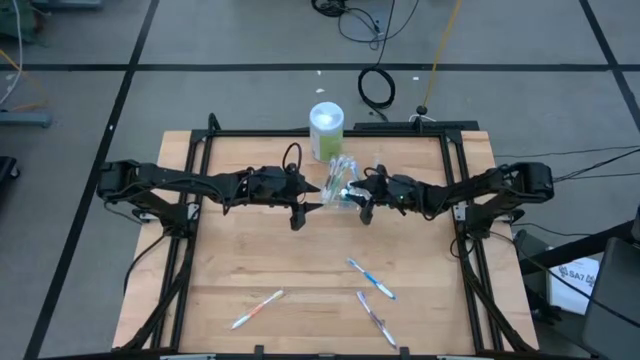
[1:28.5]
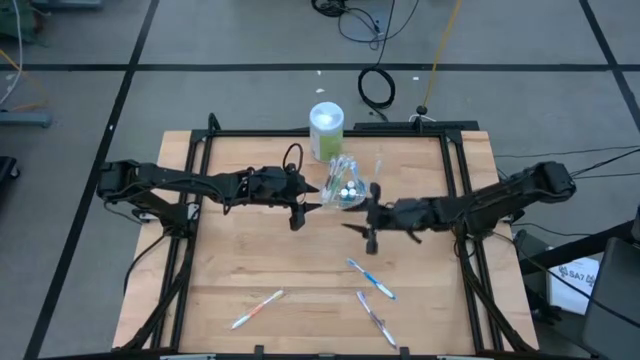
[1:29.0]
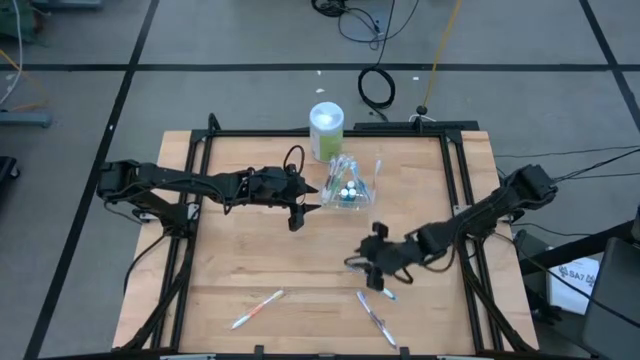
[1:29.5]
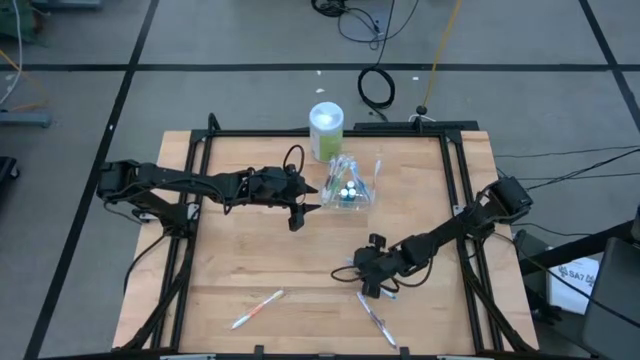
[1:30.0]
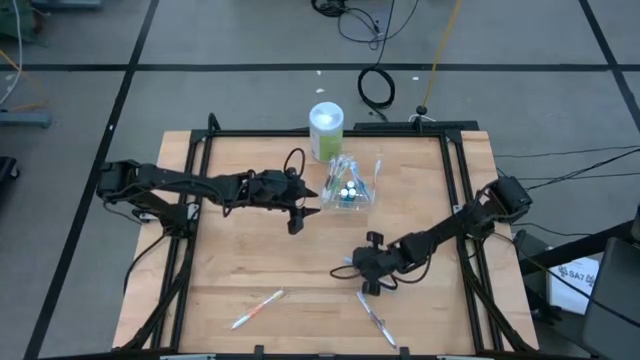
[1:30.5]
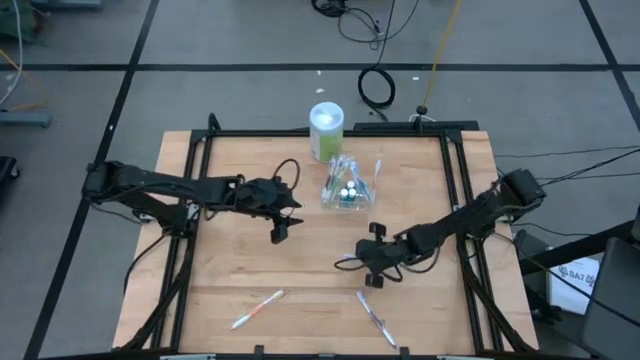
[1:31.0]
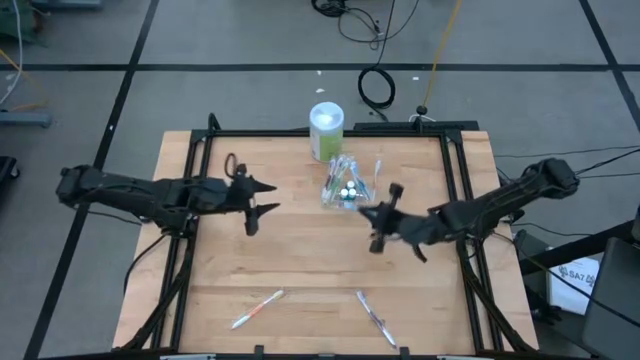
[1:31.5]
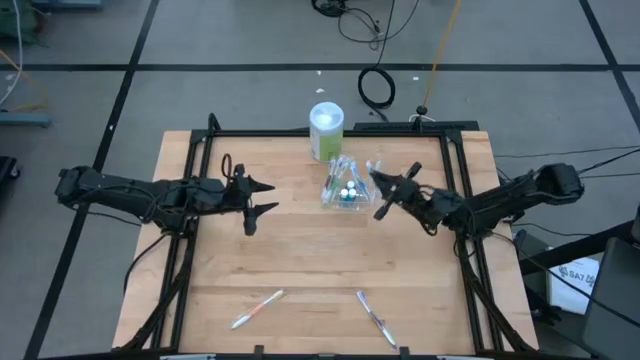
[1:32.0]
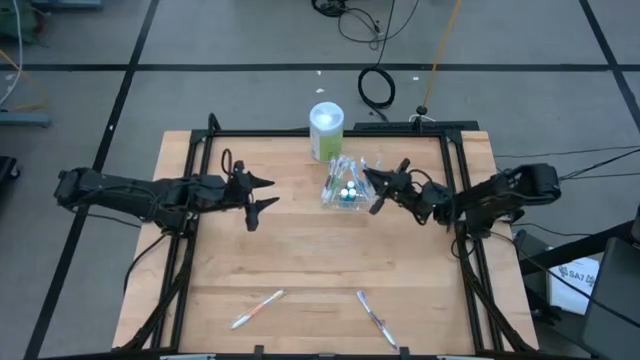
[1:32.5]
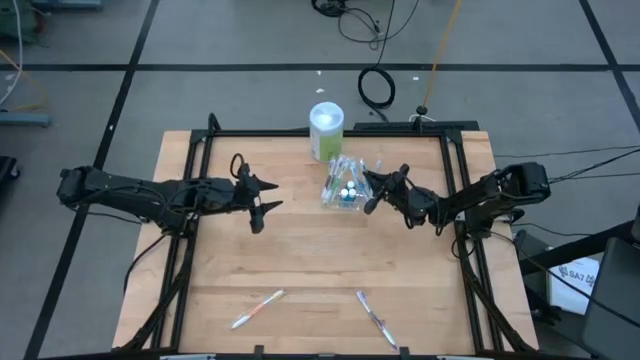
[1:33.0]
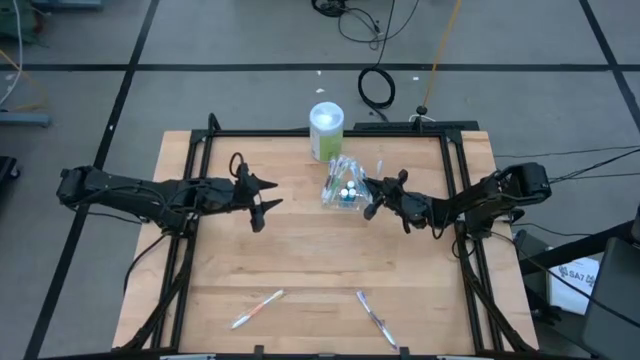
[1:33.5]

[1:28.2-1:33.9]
Task: Pick & Place toothbrushing station
Put the blue toothbrush into the transparent organizer

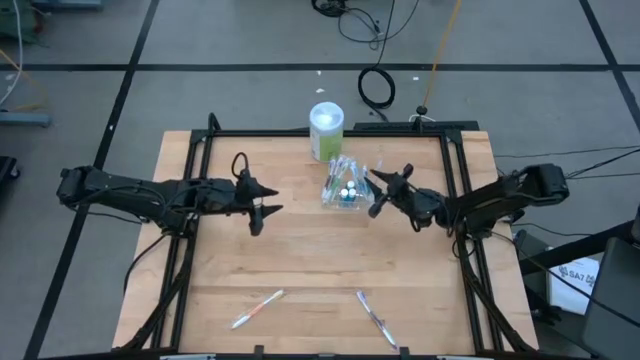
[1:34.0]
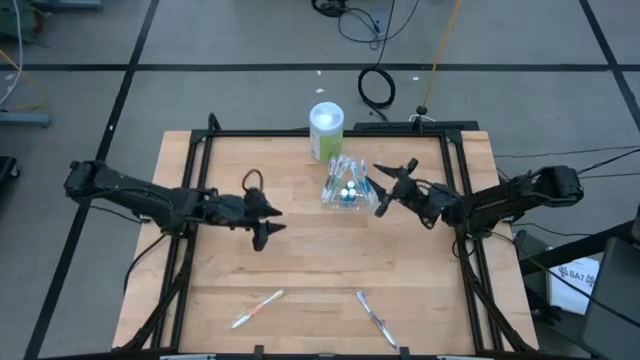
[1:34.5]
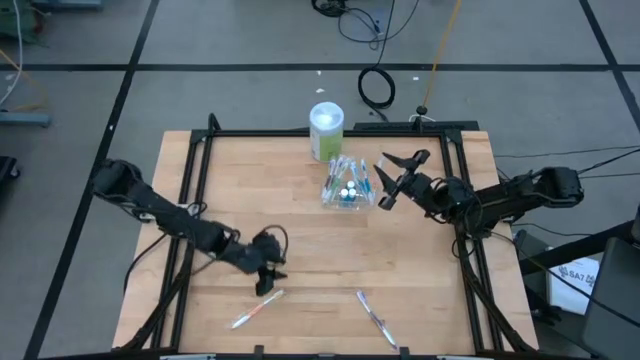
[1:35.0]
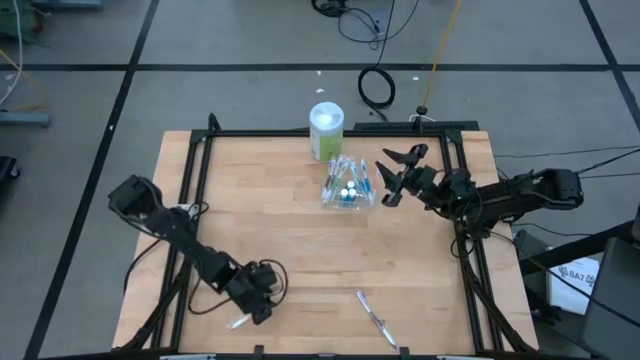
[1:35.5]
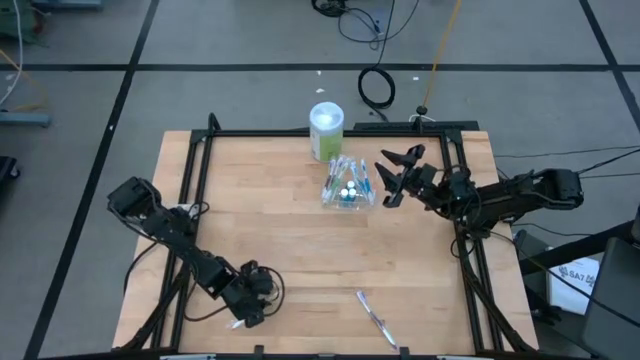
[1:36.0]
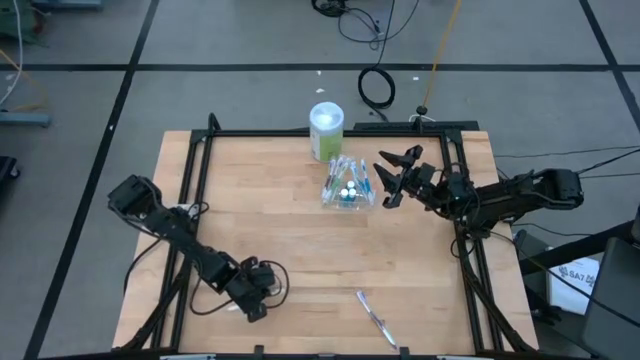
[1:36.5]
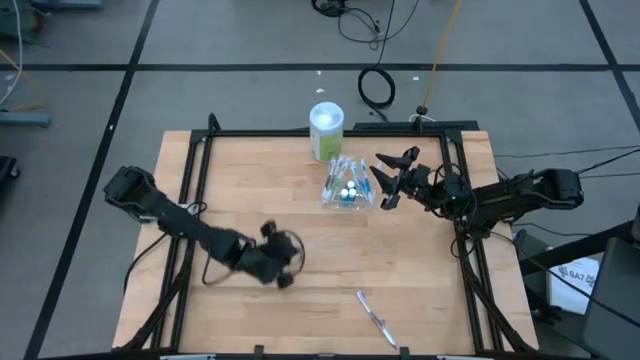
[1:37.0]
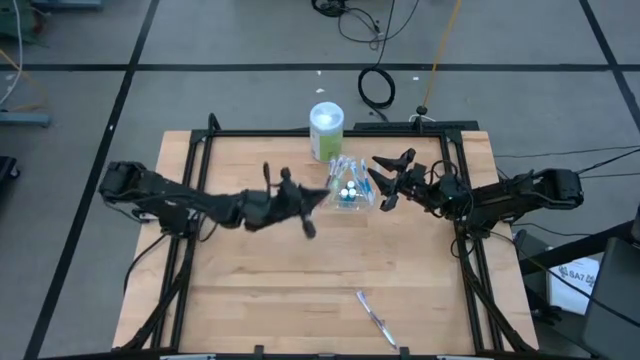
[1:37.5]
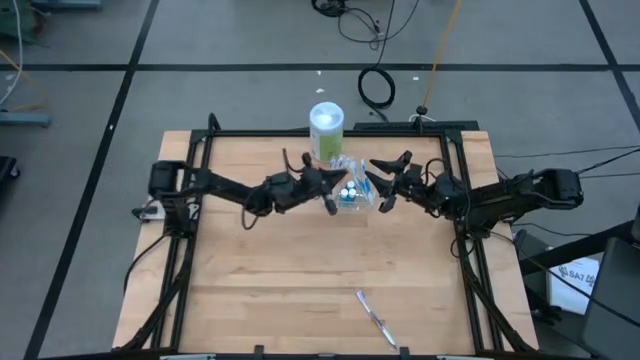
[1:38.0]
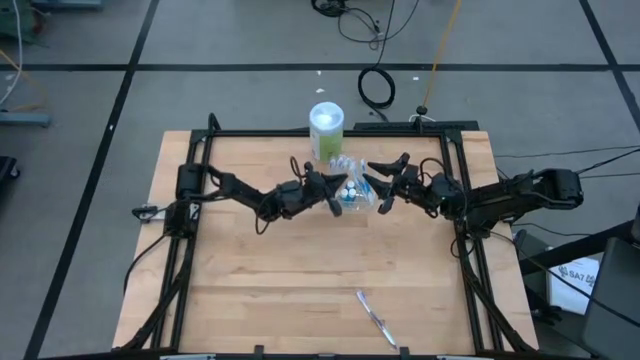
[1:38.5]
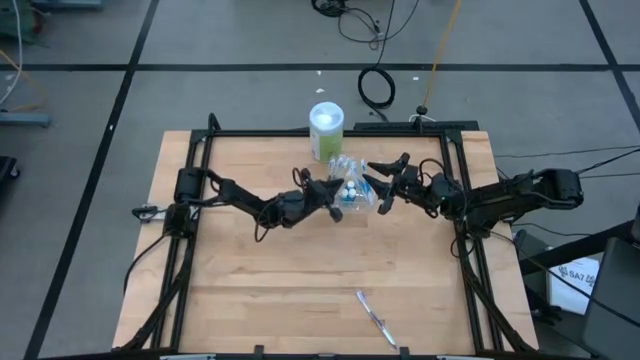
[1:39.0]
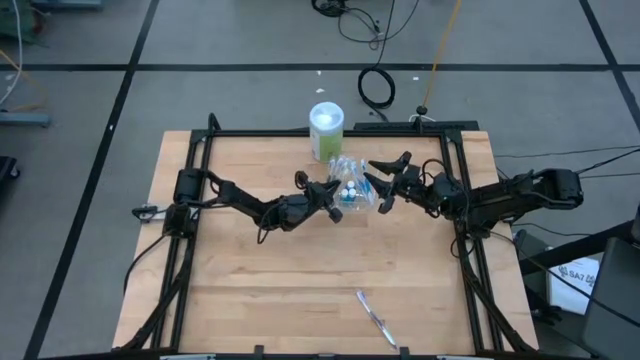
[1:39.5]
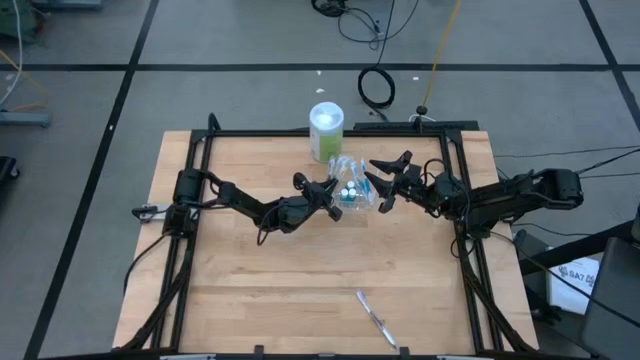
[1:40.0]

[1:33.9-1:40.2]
Put the orange toothbrush into the transparent organizer

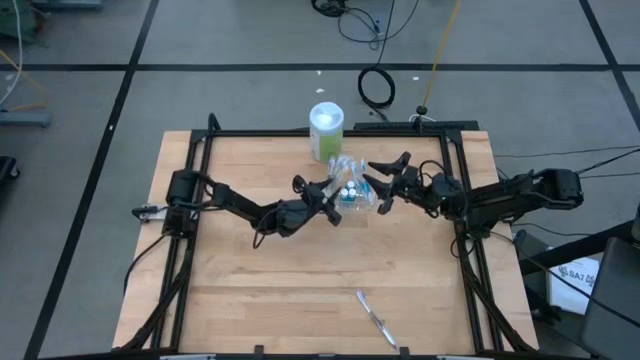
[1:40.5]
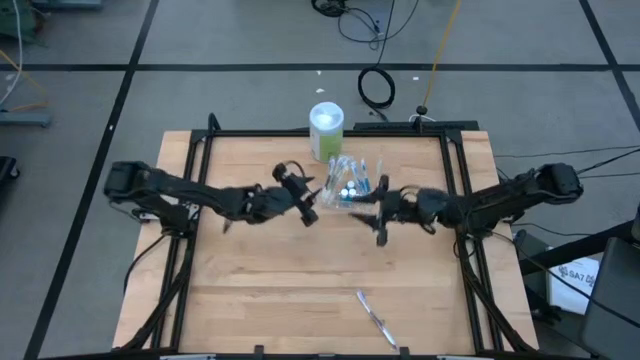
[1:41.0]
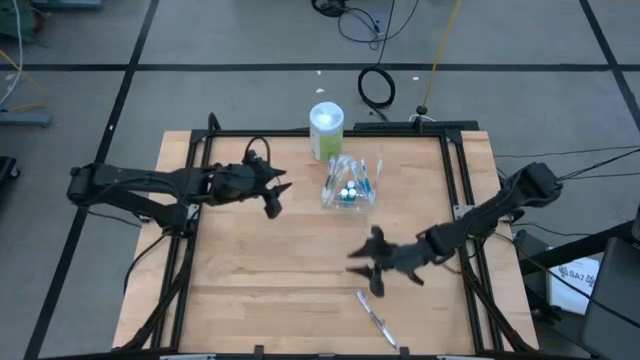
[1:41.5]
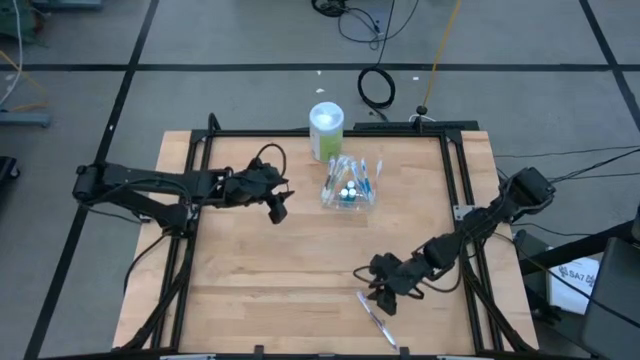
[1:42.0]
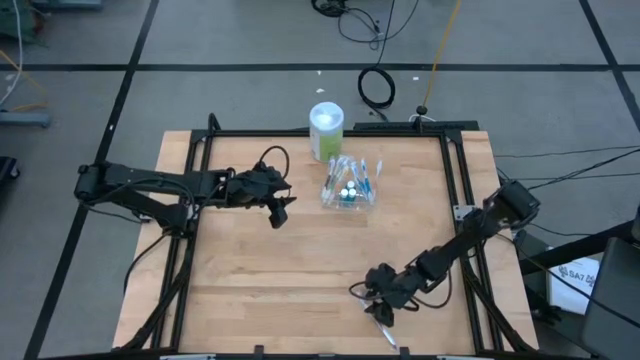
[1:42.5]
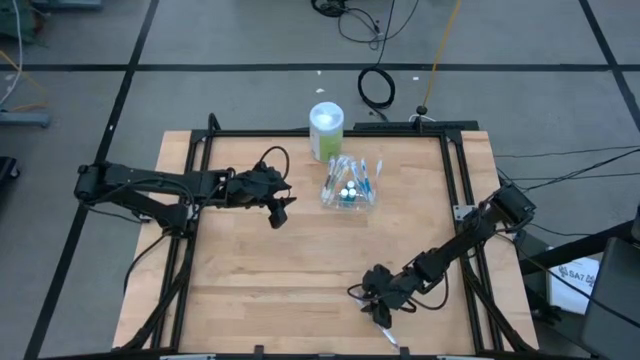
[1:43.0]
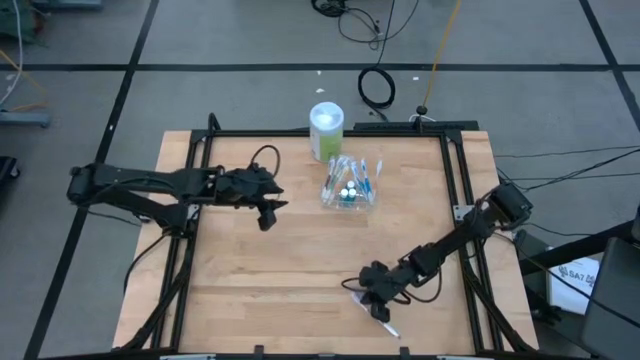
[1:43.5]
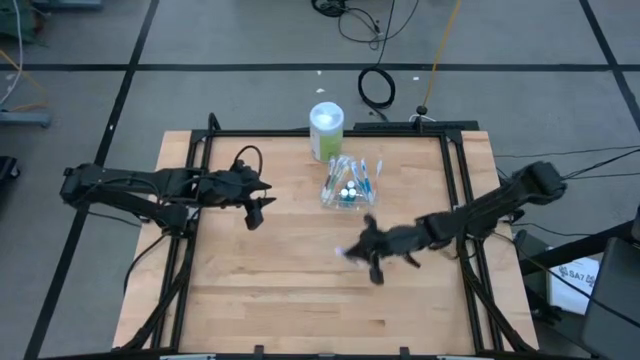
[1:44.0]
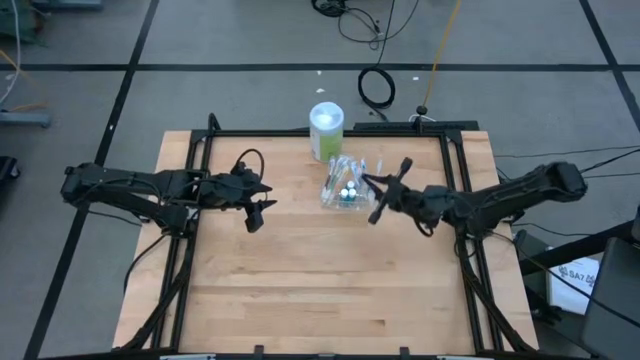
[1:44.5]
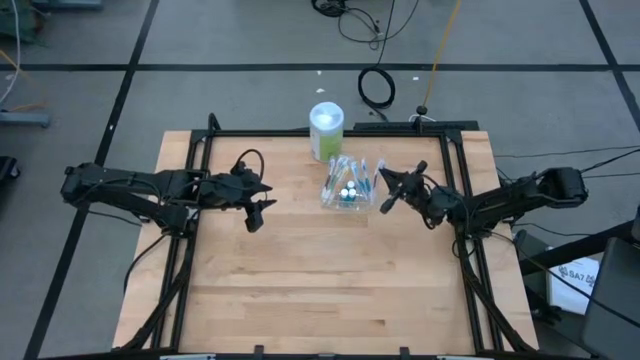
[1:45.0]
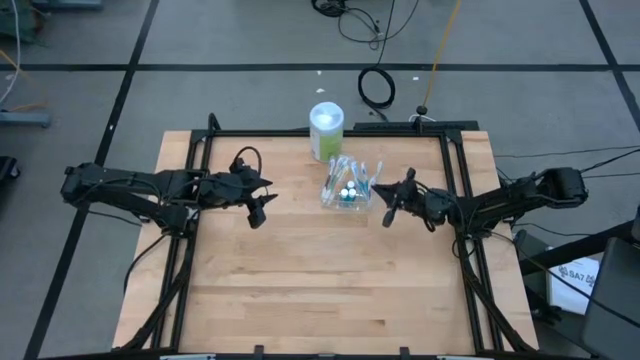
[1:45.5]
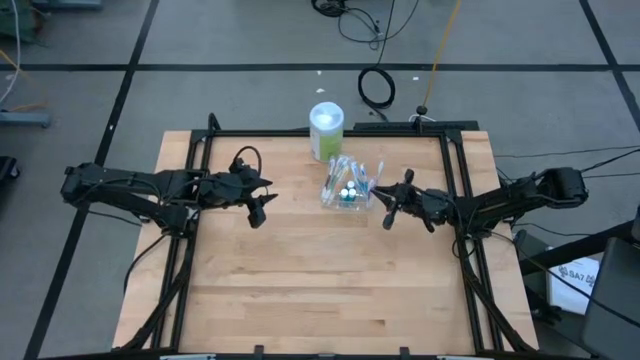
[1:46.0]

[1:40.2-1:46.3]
Put the violet and green toothbrush into the transparent organizer

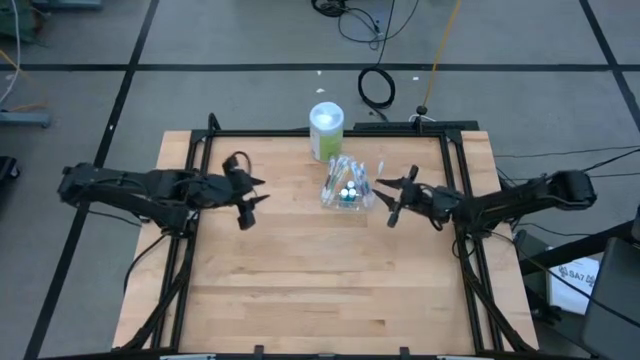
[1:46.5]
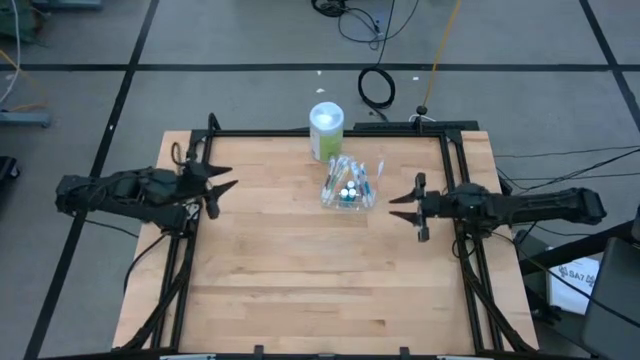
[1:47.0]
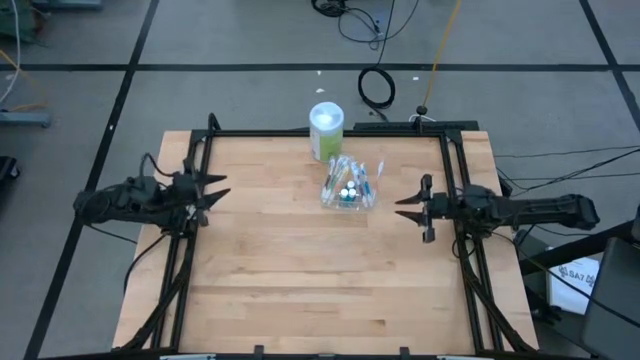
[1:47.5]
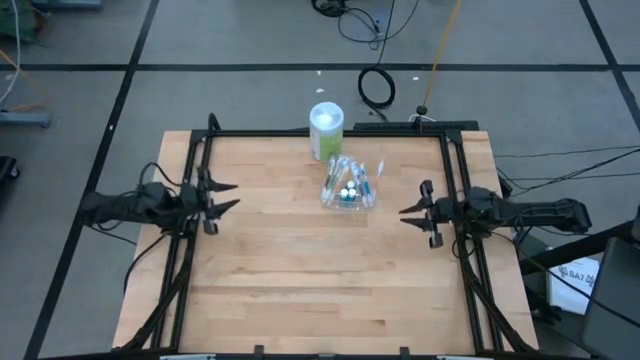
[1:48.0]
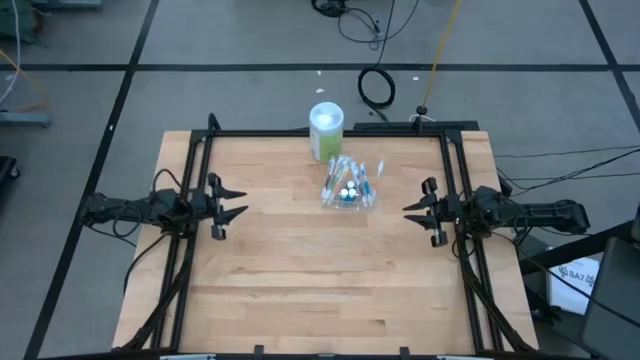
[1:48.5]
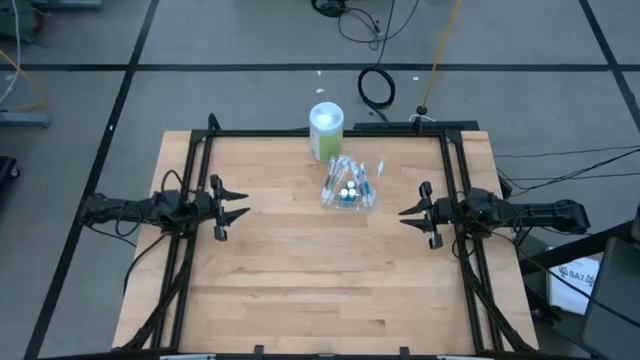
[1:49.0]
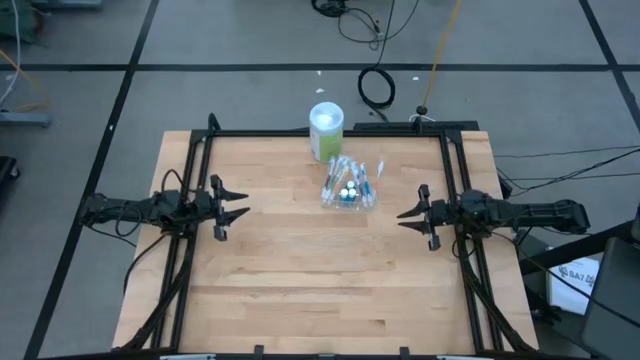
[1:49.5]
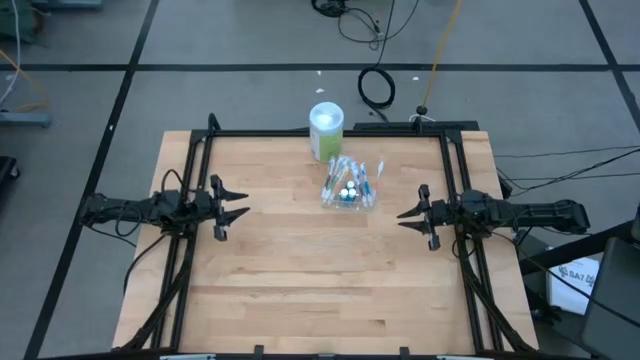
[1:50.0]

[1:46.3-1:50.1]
Return to Home Position
